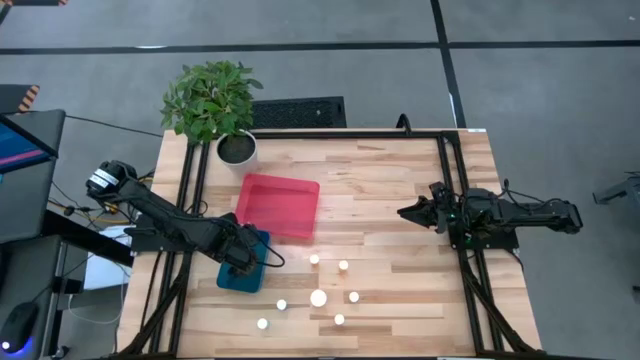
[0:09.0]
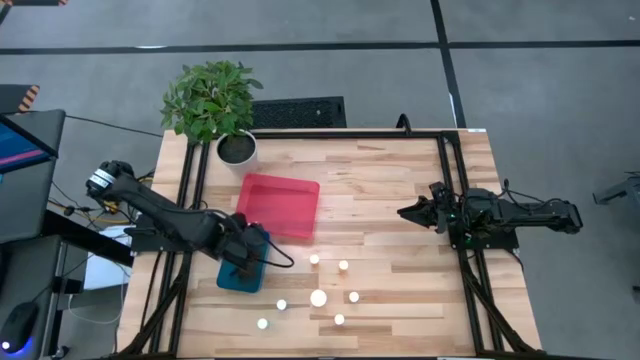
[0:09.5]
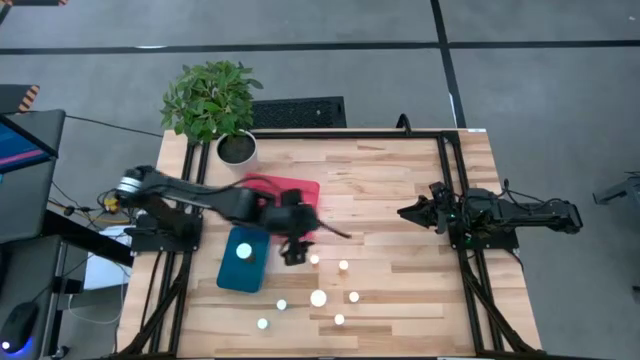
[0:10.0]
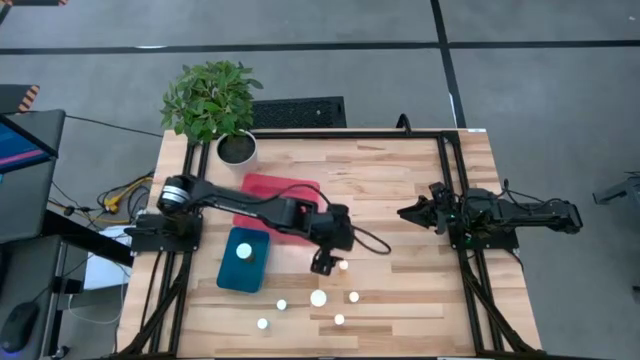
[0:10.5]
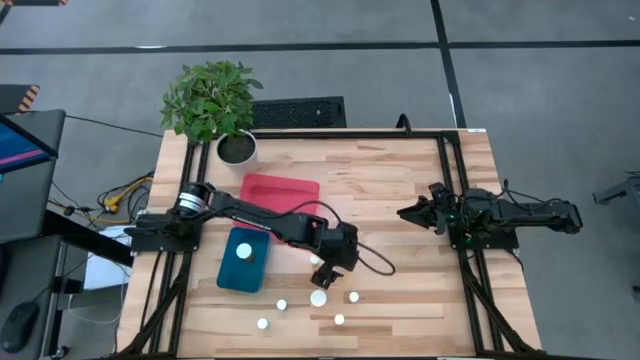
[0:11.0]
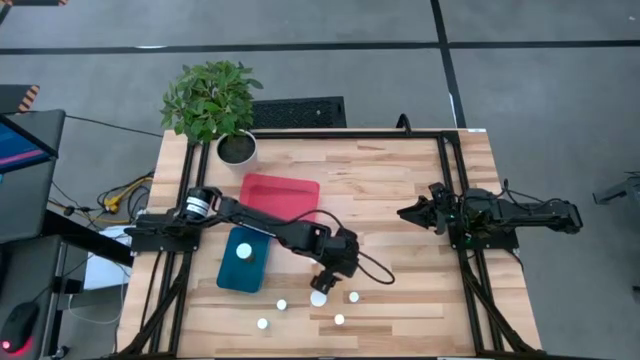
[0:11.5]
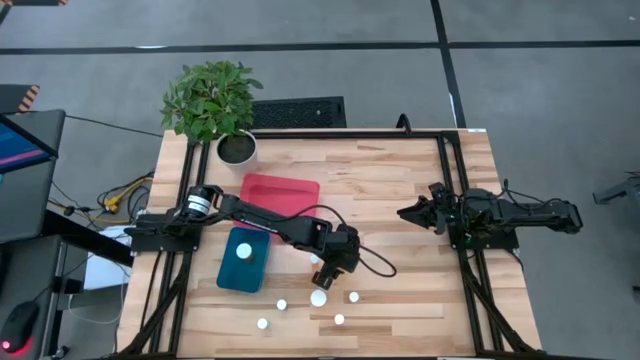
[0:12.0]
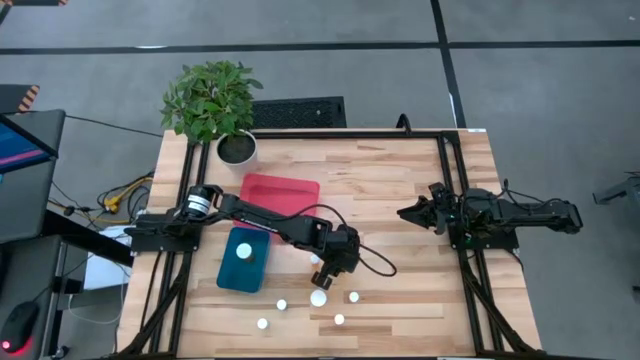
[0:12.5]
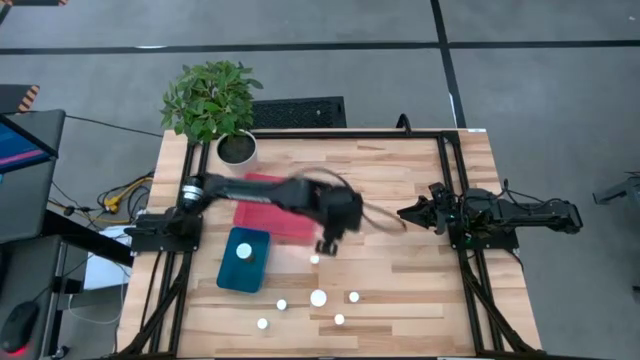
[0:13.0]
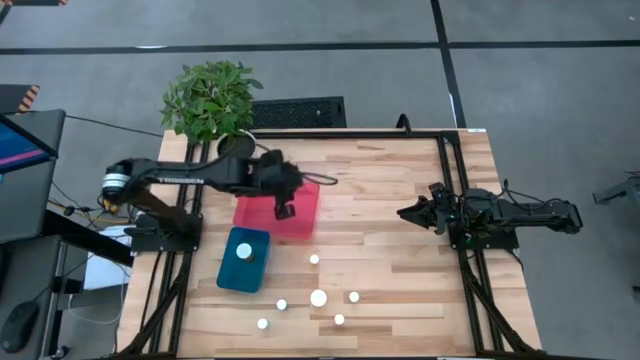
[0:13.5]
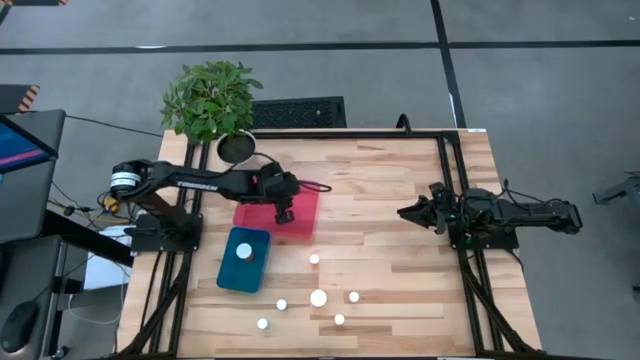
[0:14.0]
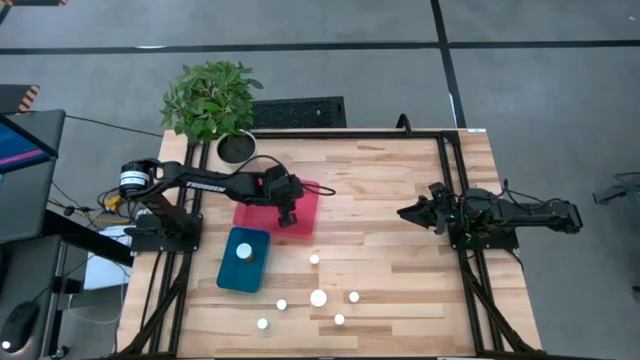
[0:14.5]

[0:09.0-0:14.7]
Task: Pick and place medicine bottles into bin by pill shape (circle, oval)
Put the orange tablet bottle into the red bin

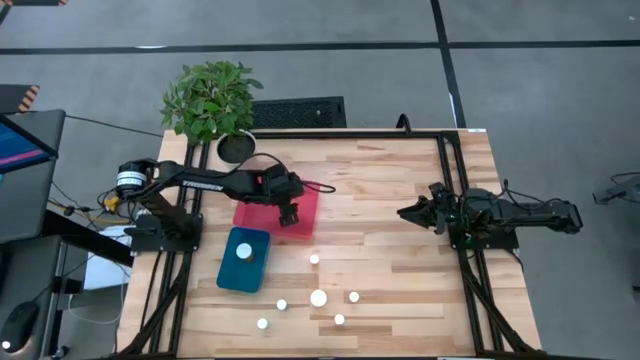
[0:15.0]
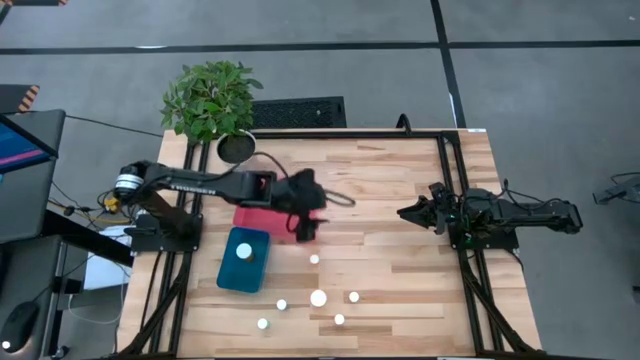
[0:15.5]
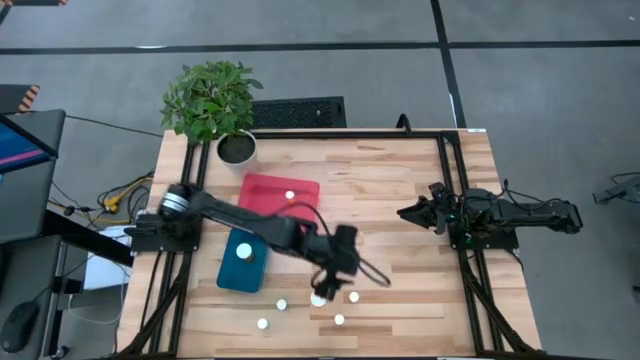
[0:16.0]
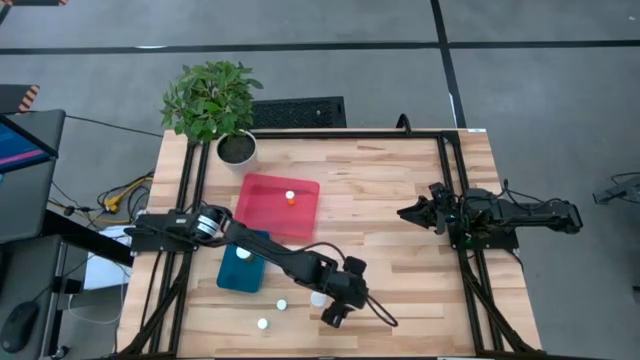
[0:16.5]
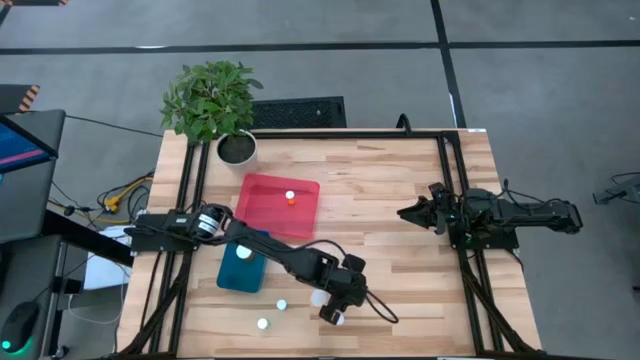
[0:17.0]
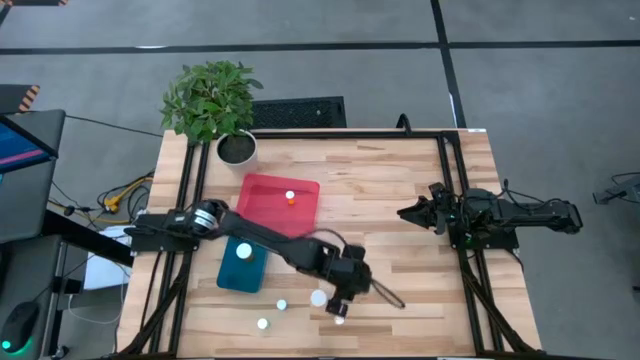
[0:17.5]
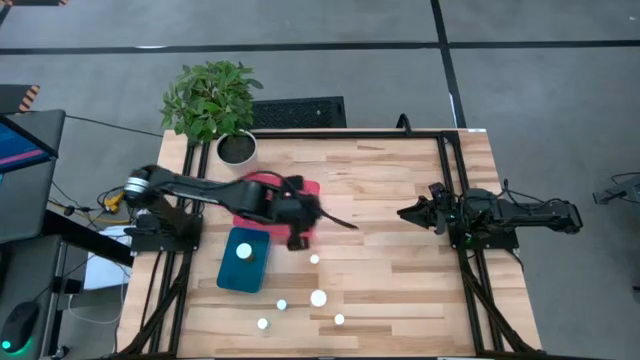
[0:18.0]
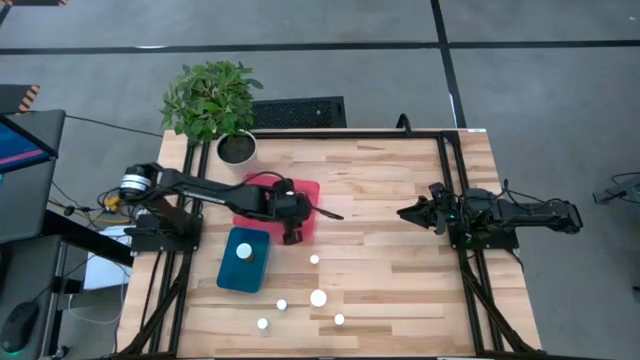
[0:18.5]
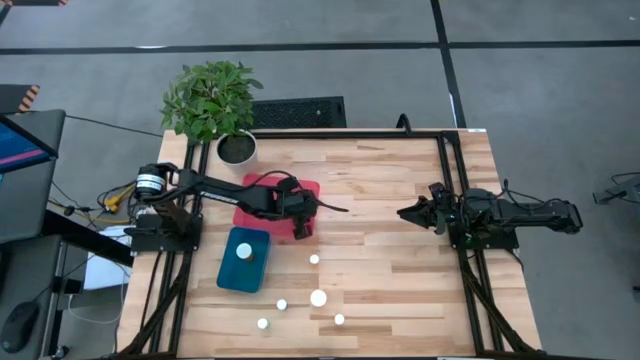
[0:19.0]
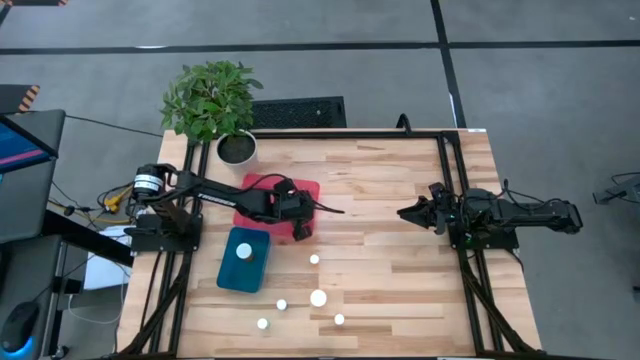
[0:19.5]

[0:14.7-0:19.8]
Put the yellow tablet bottle into the red bin

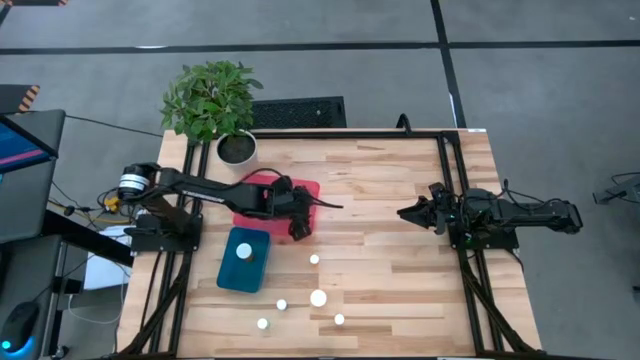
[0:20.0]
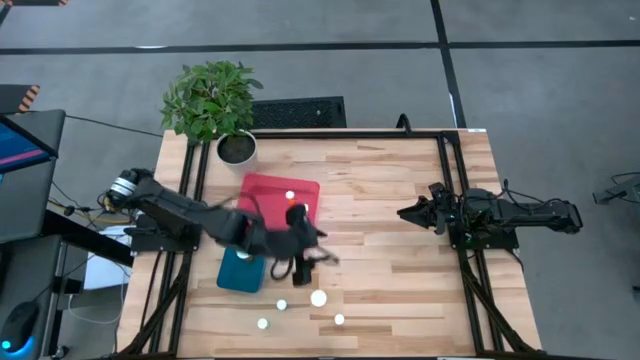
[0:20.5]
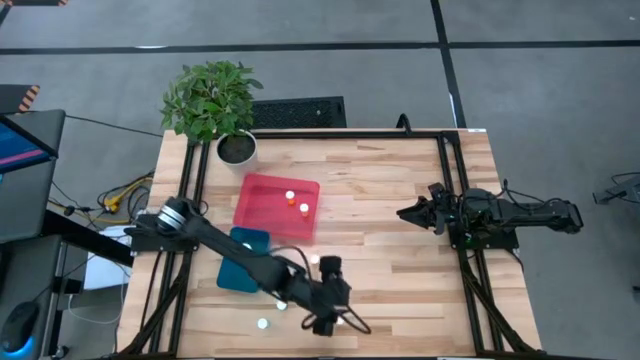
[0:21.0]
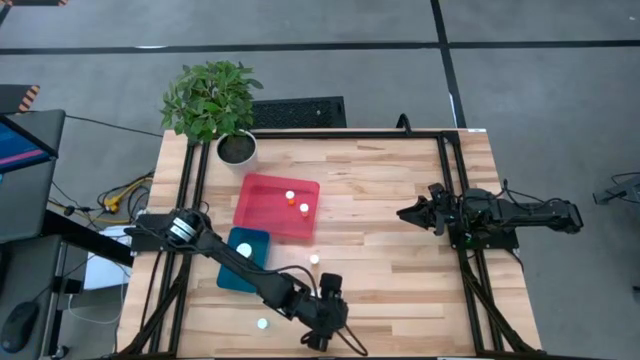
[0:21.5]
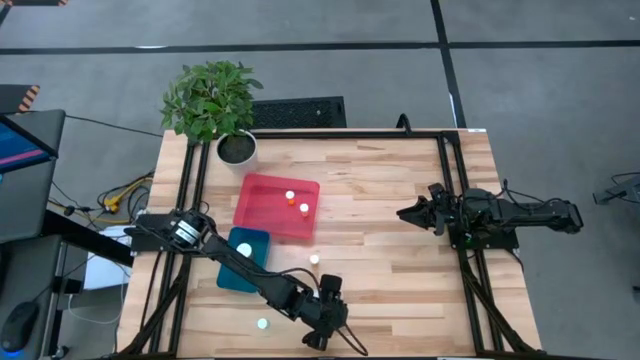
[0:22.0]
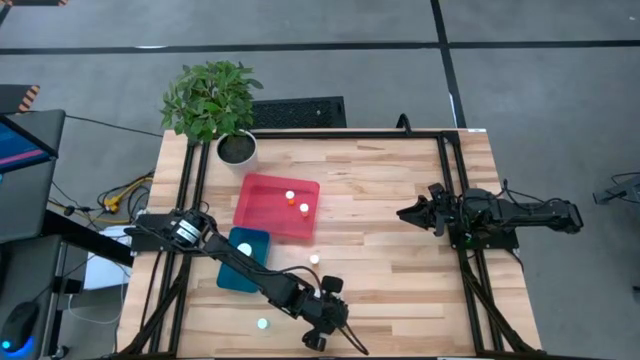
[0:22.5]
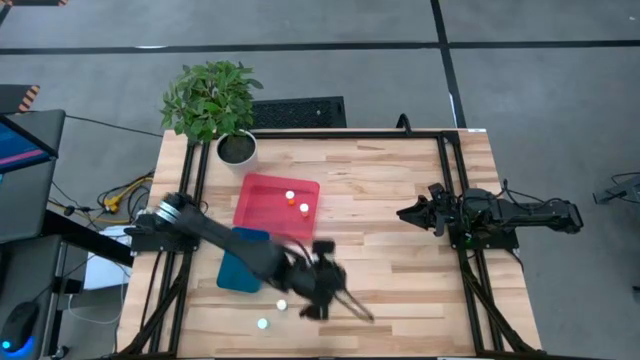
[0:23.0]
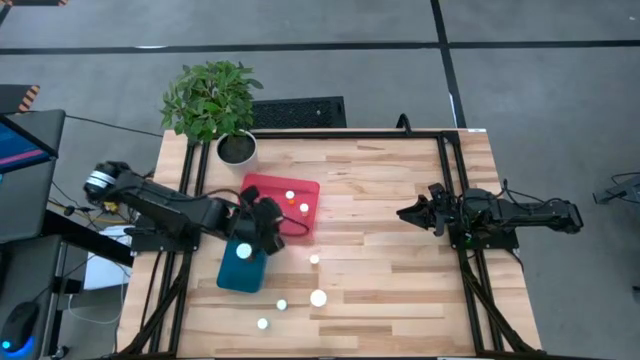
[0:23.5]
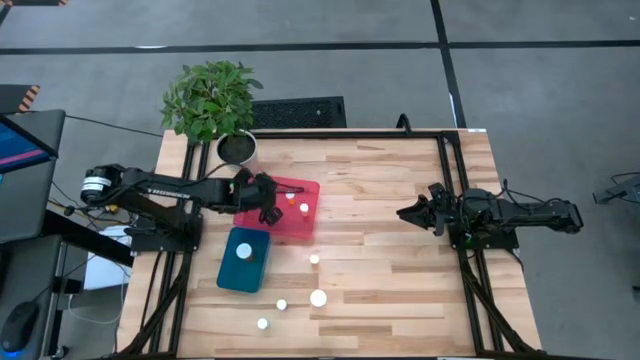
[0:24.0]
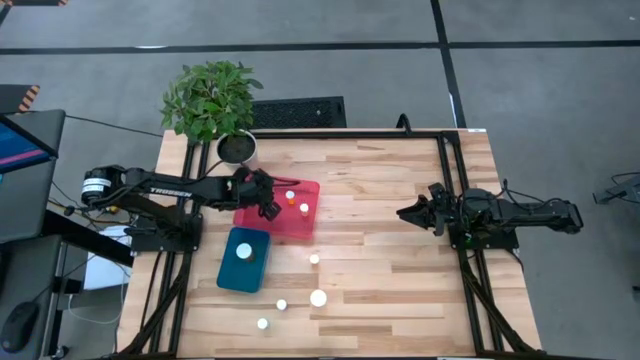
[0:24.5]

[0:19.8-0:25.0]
Put the red tablet bottle into the red bin

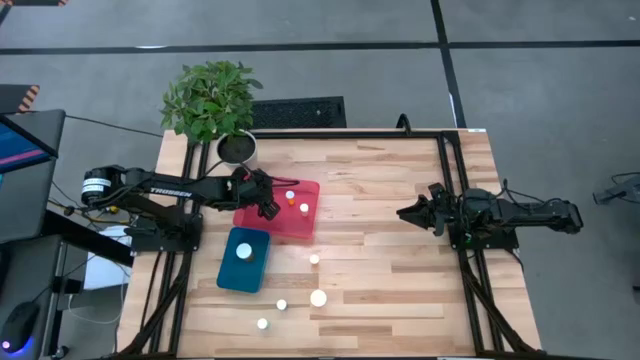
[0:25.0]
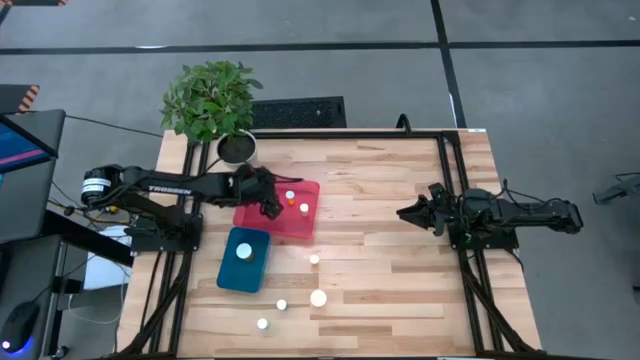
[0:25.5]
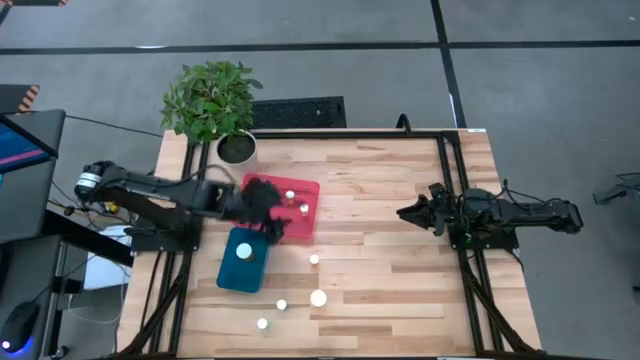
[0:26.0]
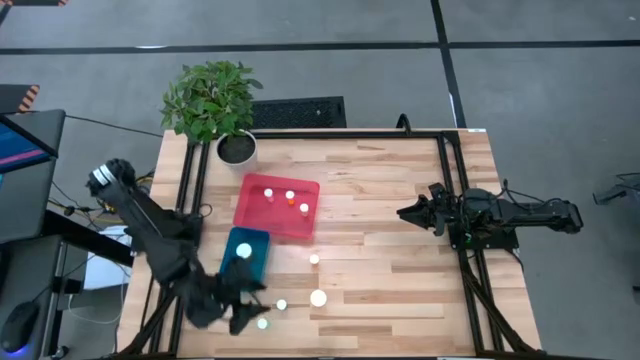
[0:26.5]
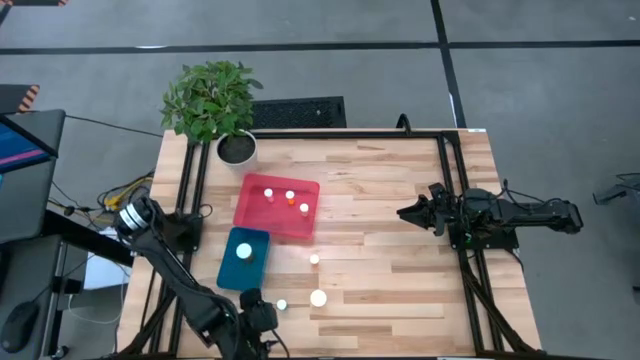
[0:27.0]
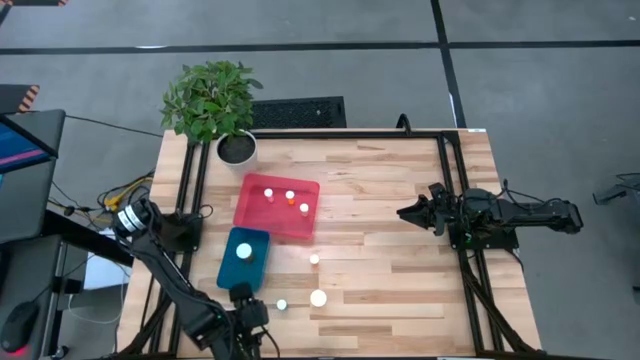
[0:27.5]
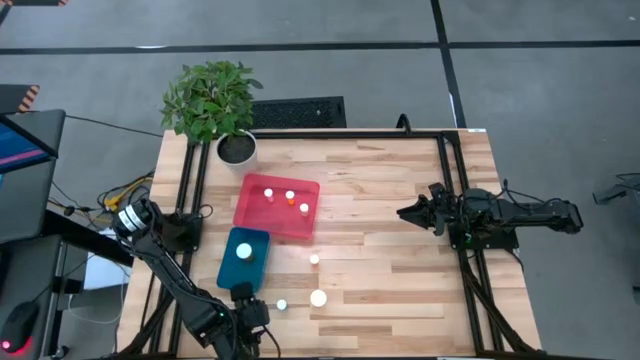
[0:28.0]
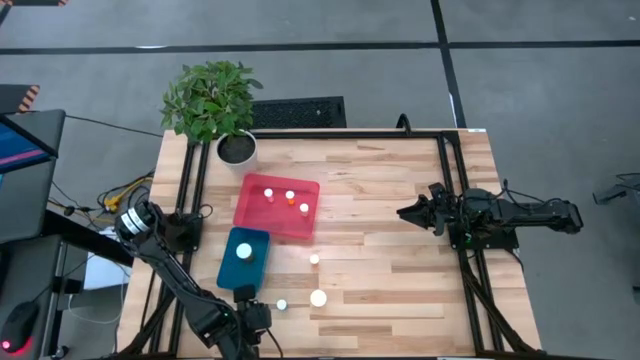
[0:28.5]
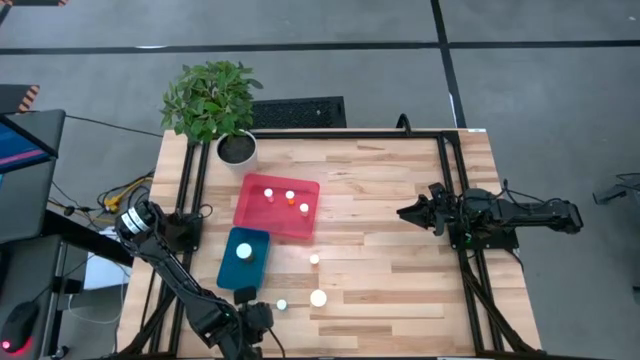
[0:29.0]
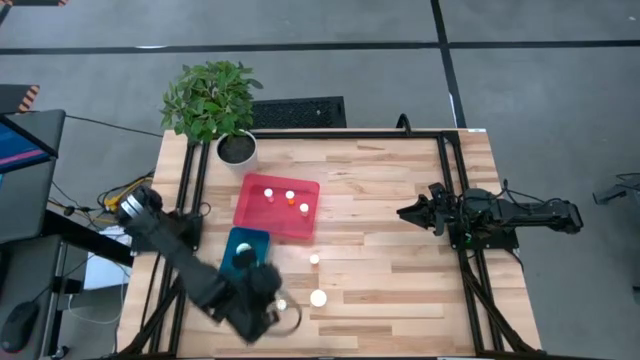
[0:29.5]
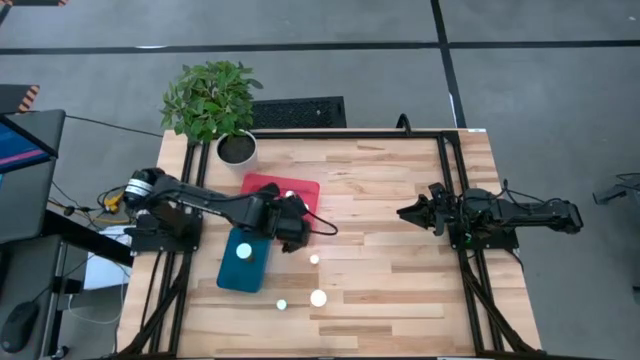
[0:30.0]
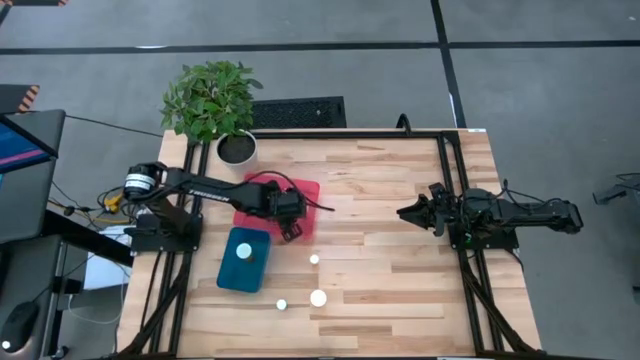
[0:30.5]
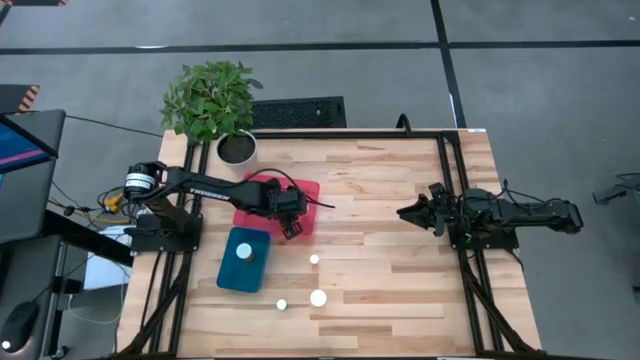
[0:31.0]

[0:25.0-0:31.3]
Put the blue tablet bottle into the red bin
